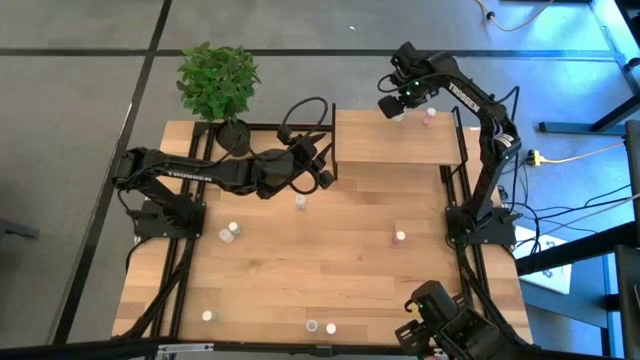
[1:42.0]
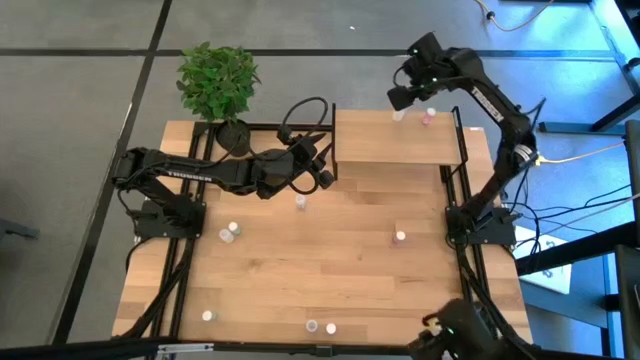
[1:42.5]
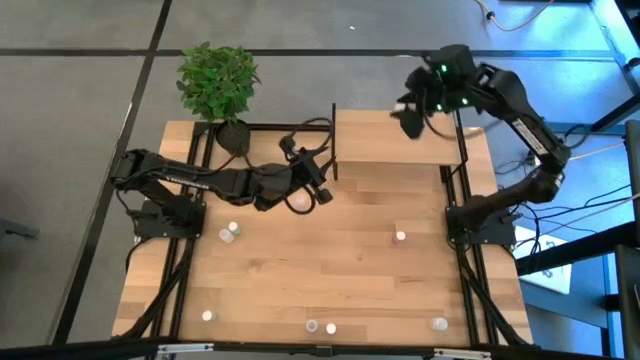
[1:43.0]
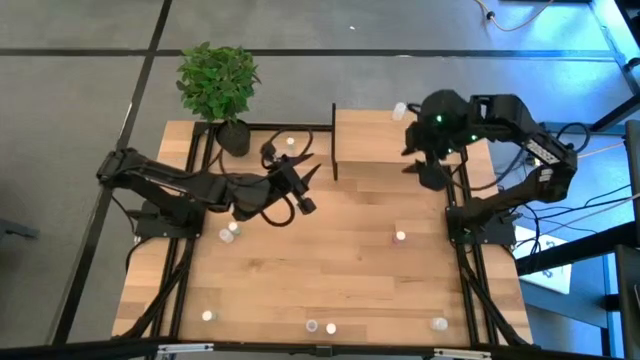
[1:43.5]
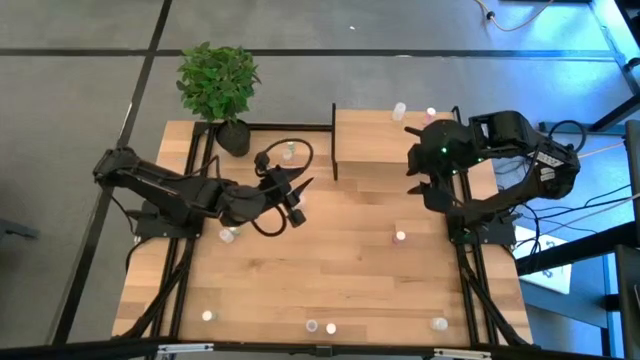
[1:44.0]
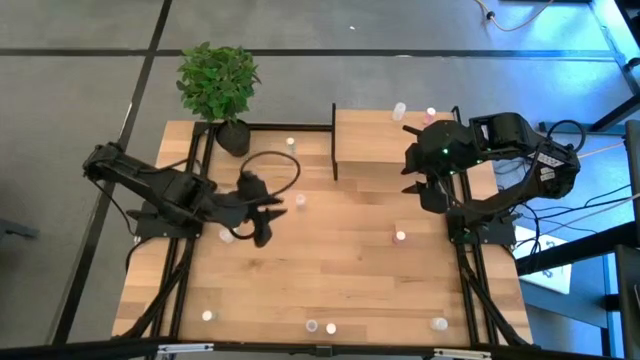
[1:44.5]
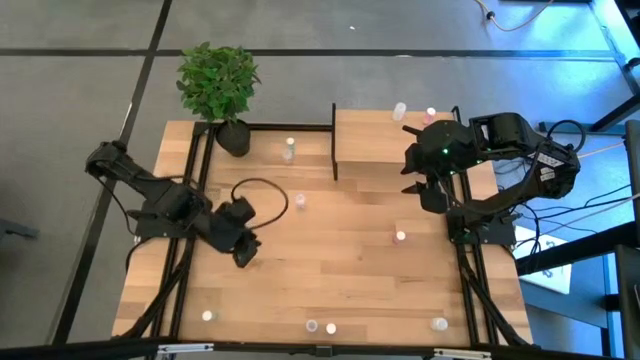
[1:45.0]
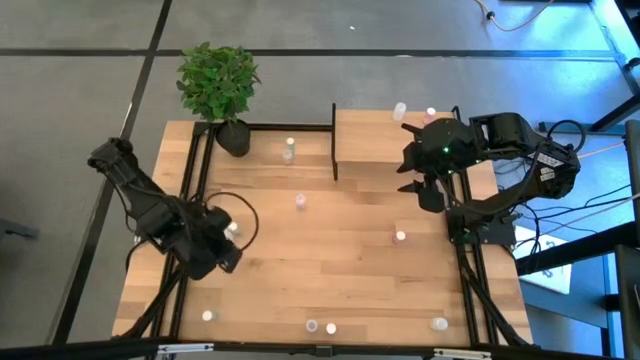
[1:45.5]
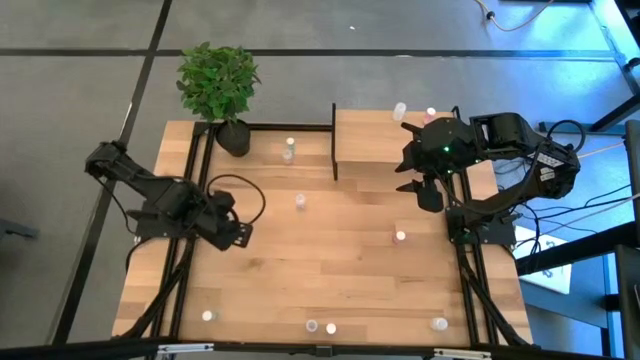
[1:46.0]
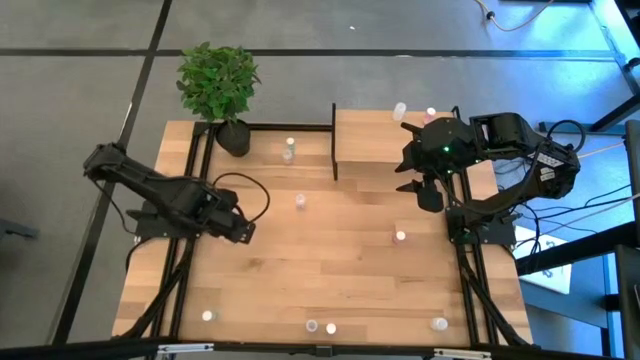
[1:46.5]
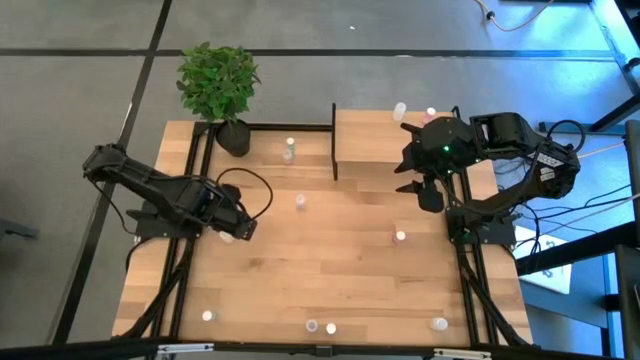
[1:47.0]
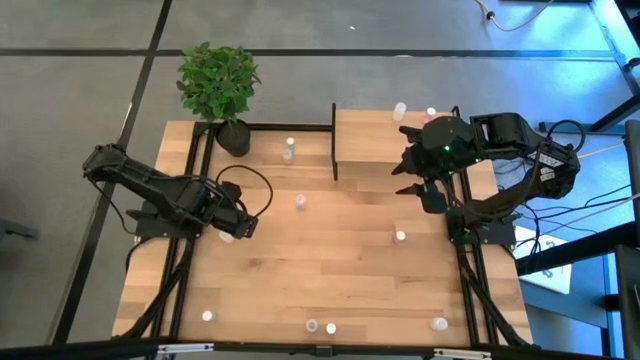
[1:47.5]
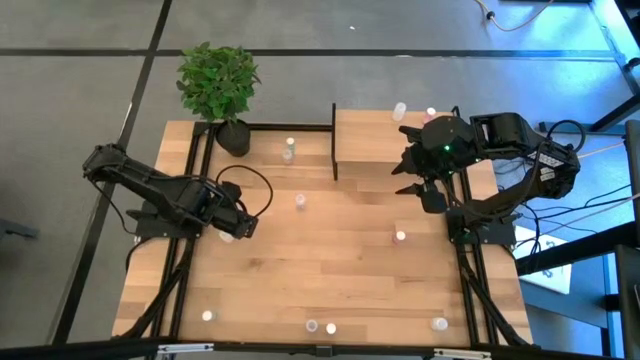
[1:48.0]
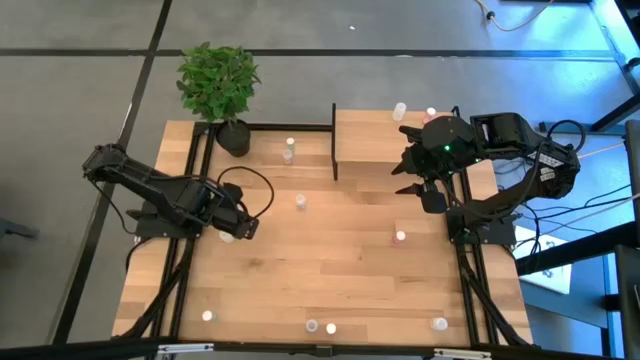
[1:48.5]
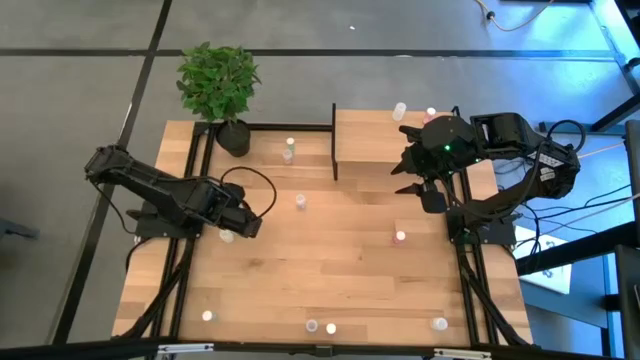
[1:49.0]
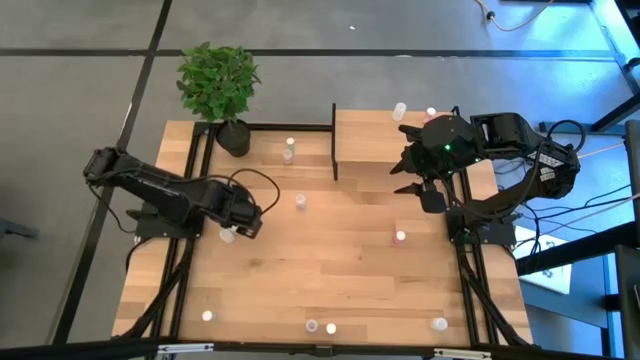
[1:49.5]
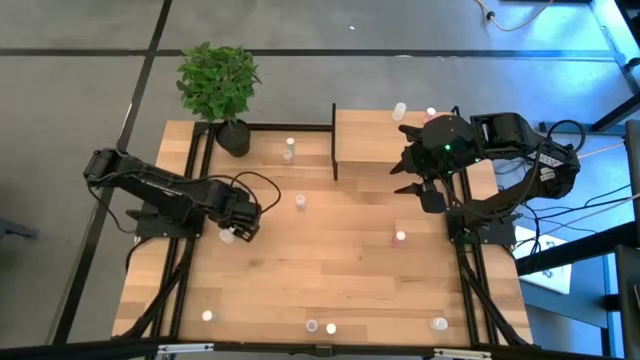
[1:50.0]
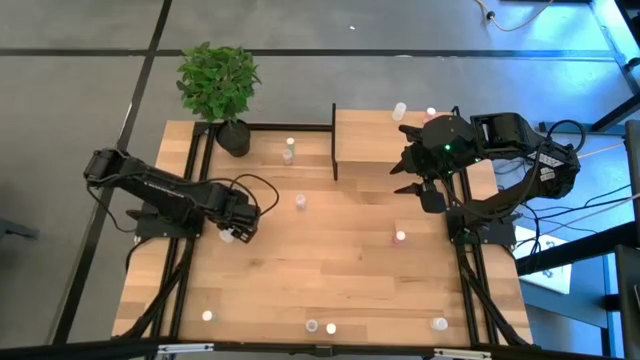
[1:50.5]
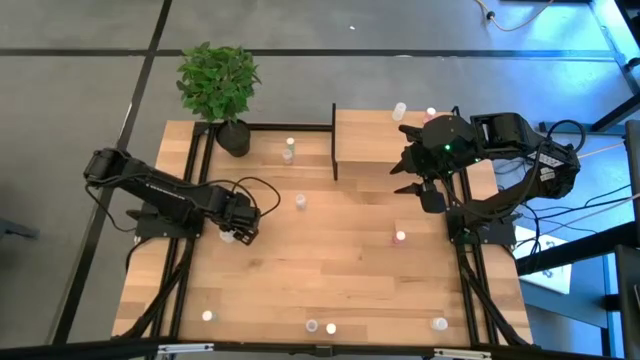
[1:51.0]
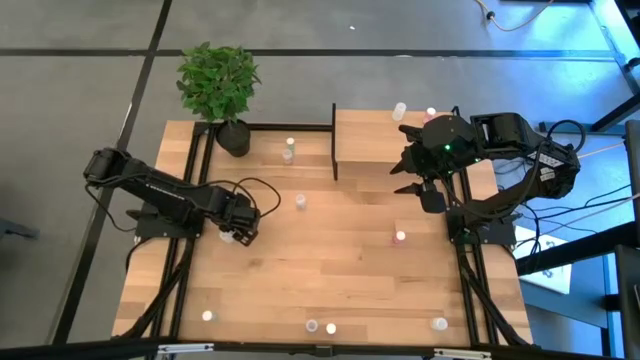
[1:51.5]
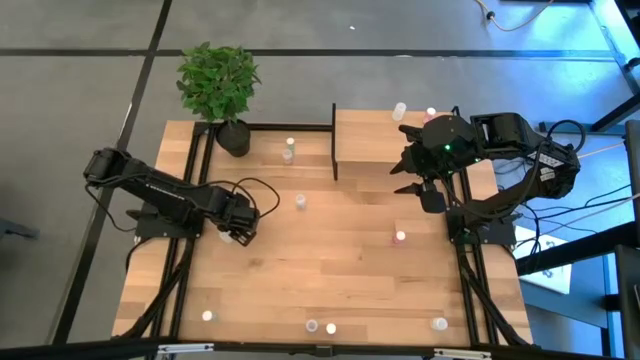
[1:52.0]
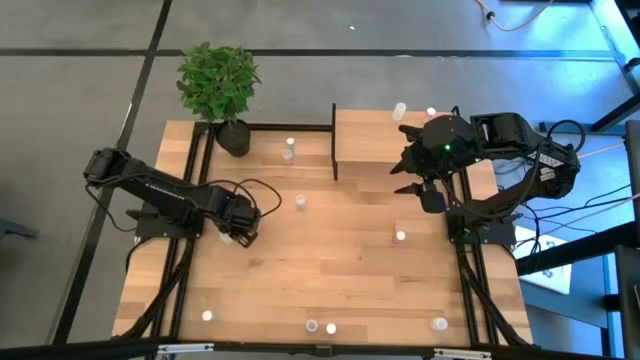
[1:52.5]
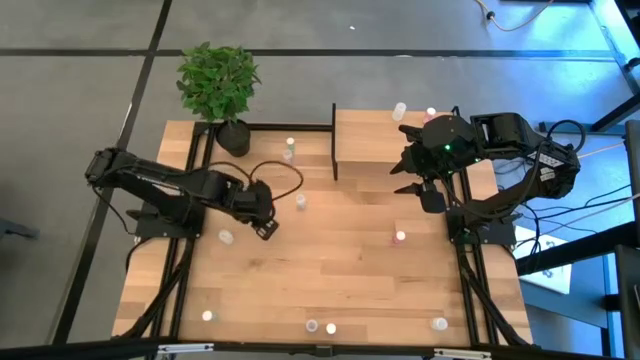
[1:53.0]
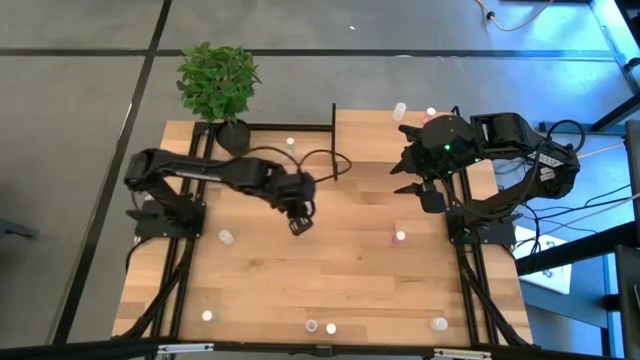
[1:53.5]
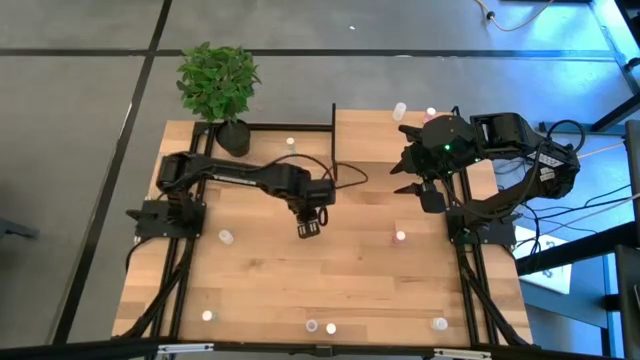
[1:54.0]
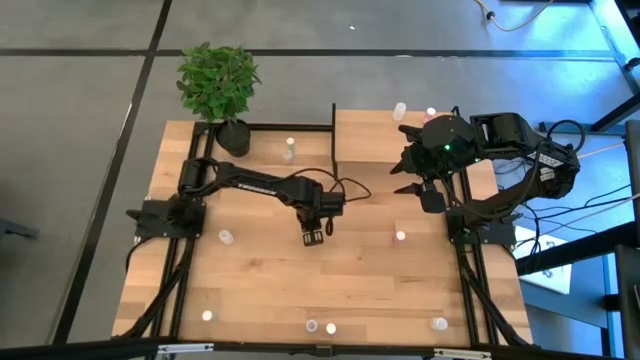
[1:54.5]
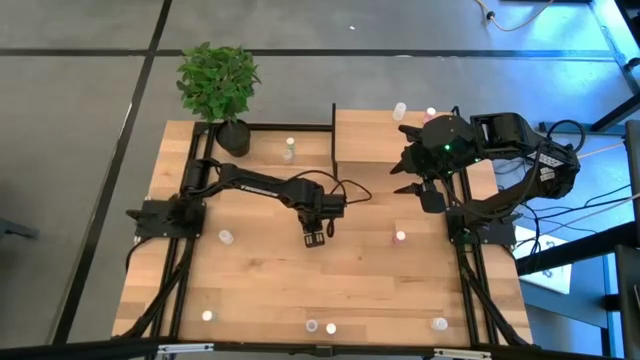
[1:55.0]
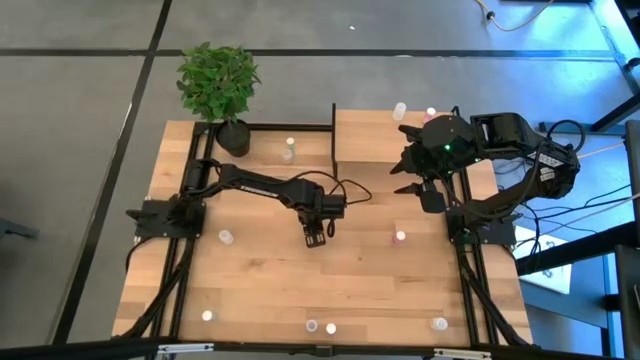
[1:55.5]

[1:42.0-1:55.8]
Task: Pick and place medicine bottles onto shelf by color
Put the middle green pill bottle on the shelf
